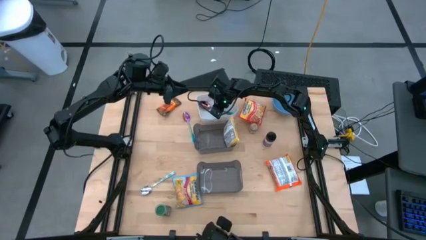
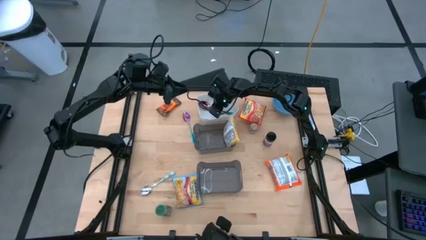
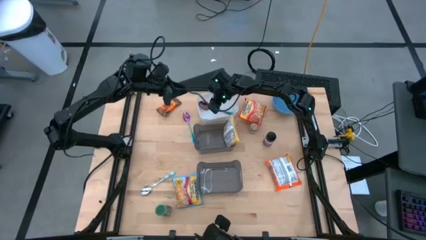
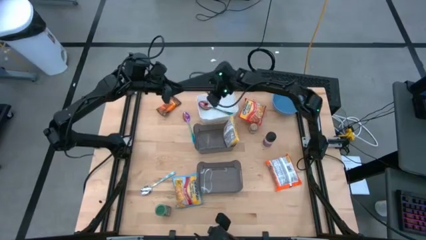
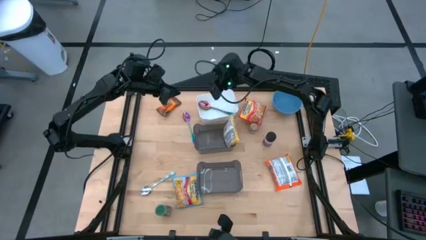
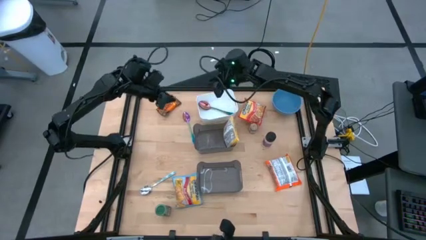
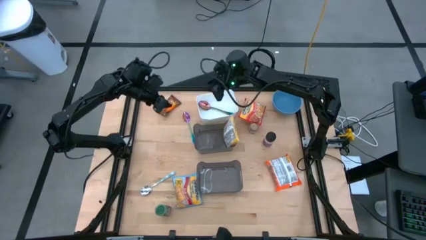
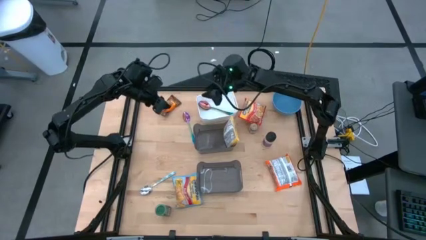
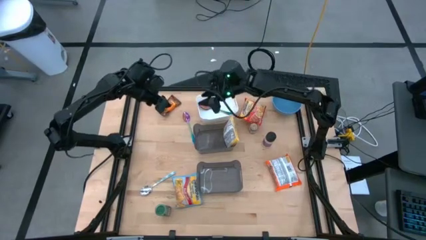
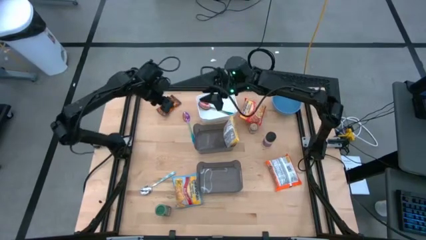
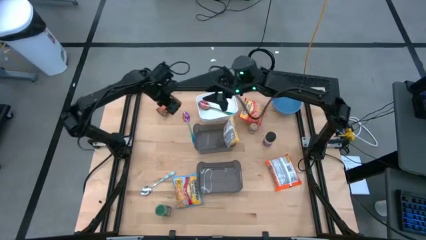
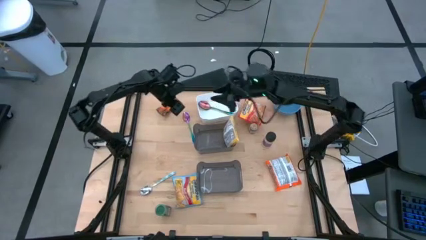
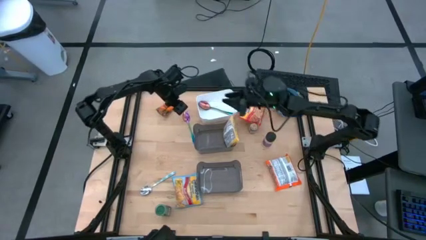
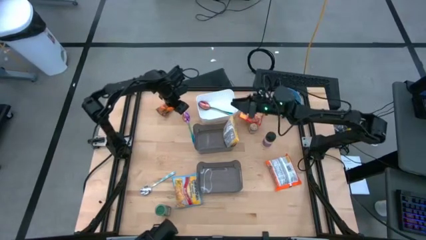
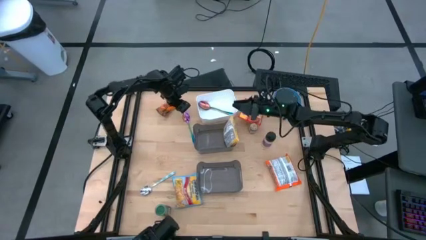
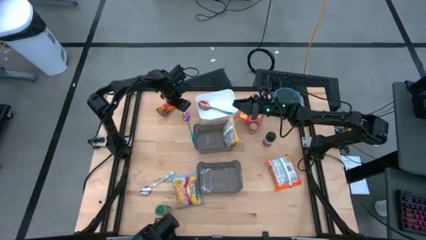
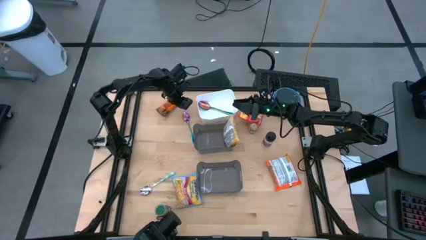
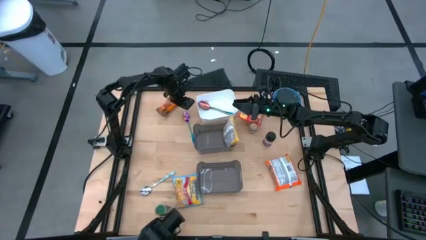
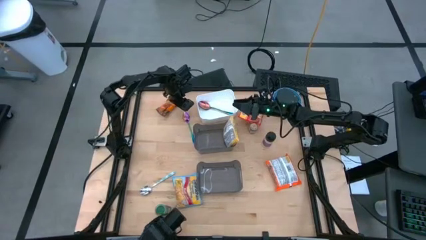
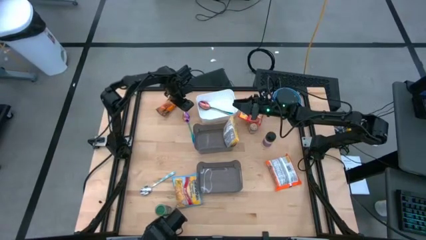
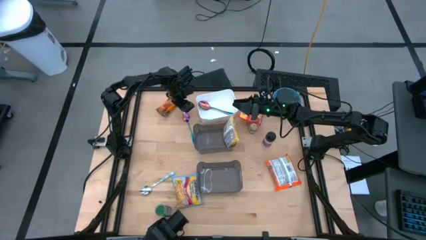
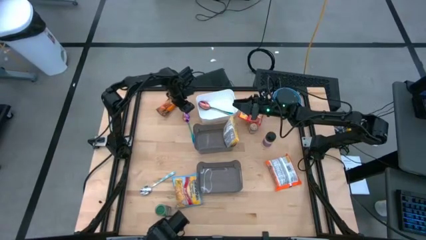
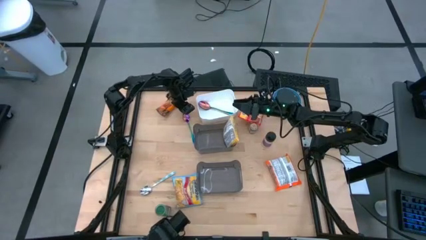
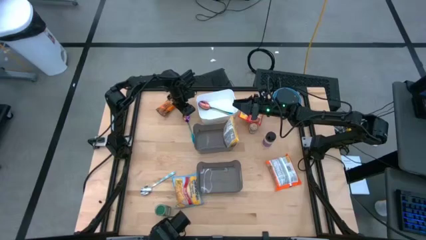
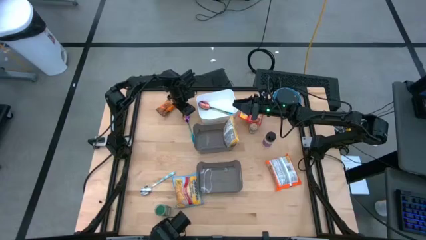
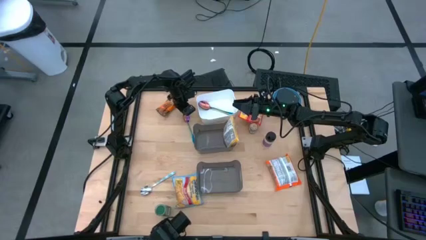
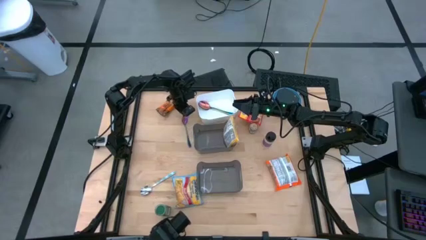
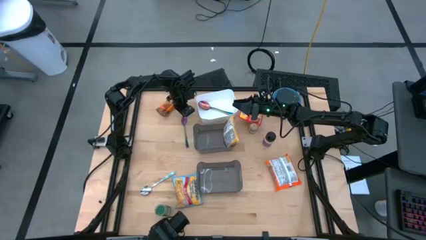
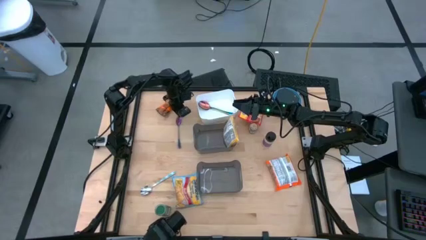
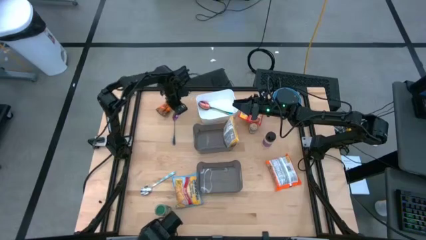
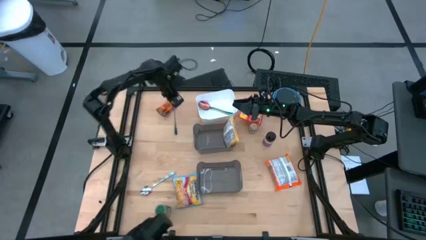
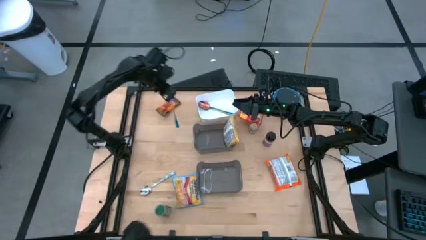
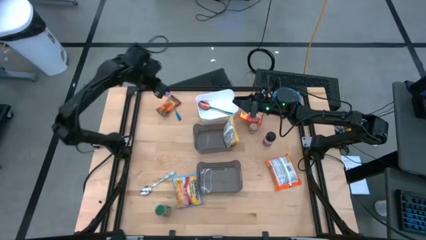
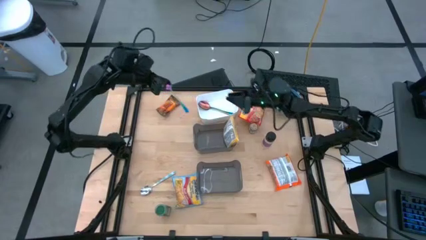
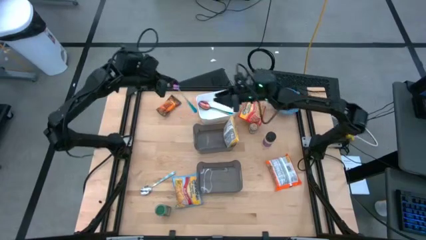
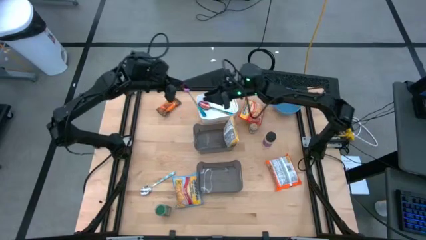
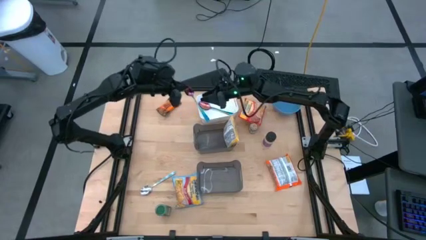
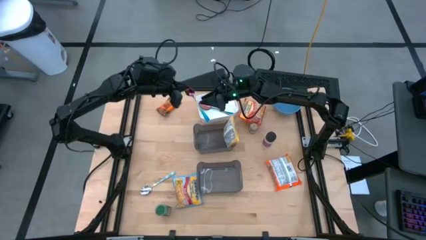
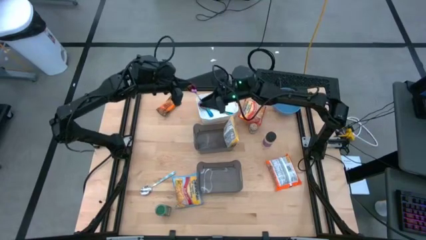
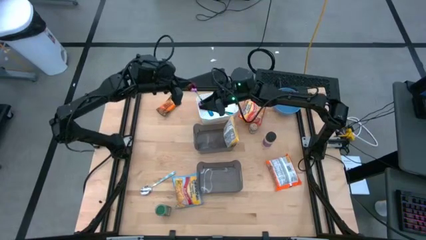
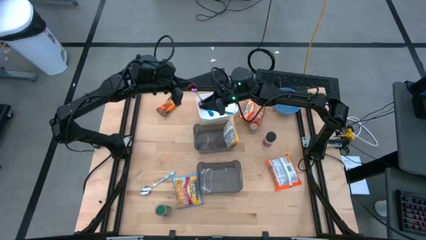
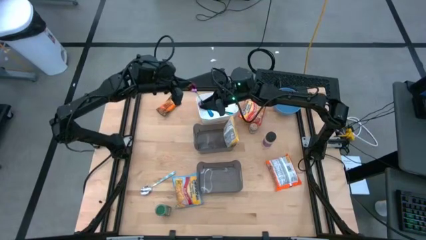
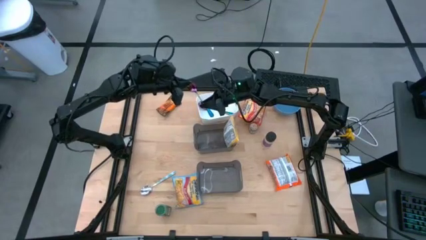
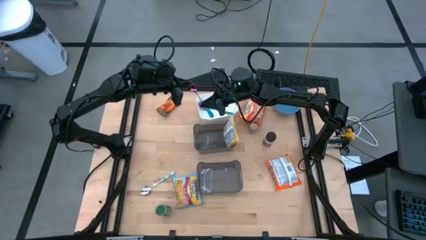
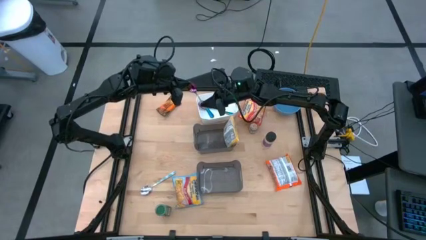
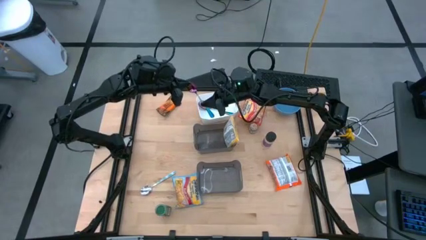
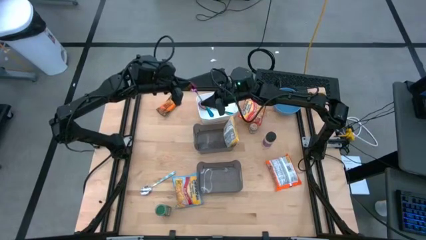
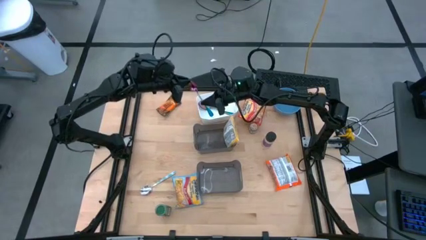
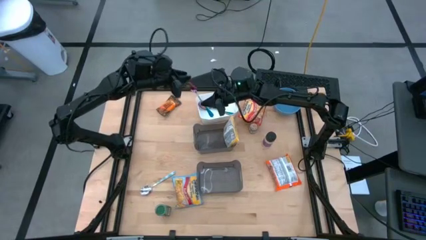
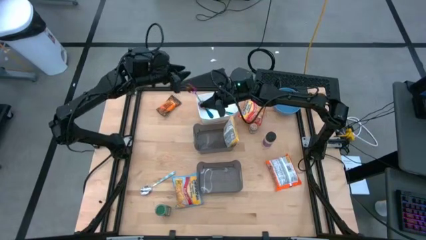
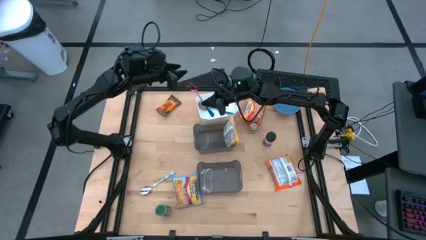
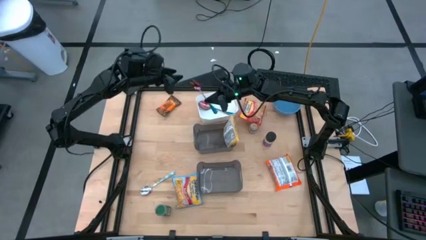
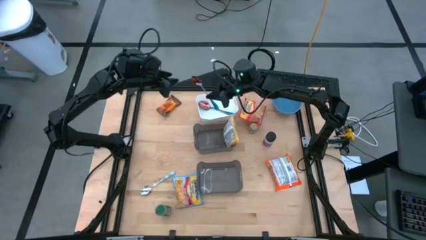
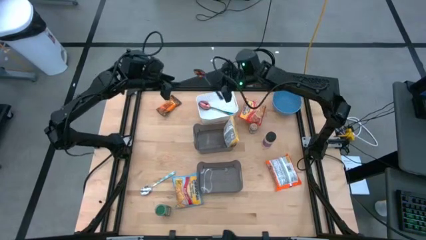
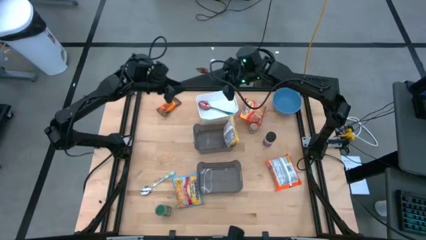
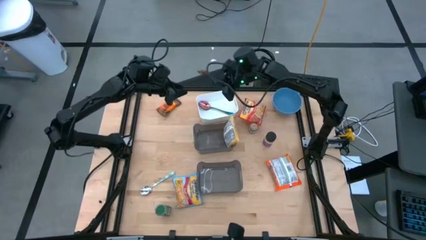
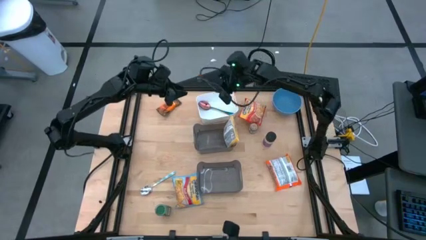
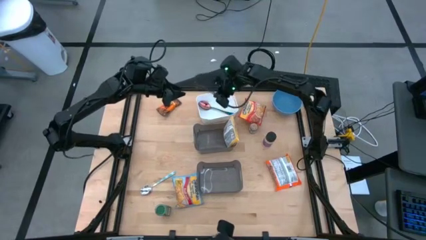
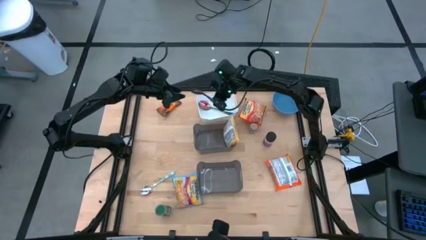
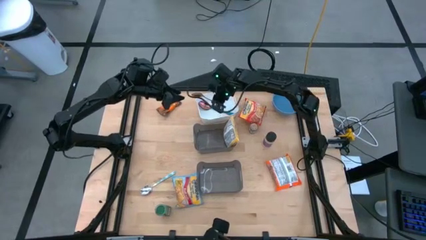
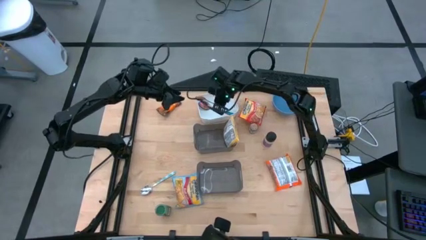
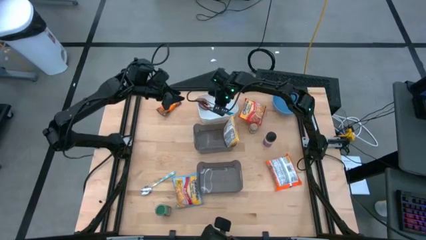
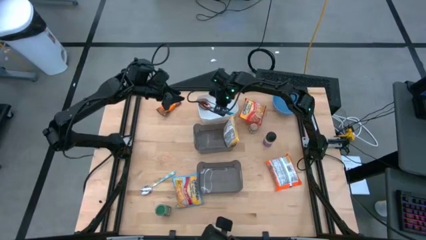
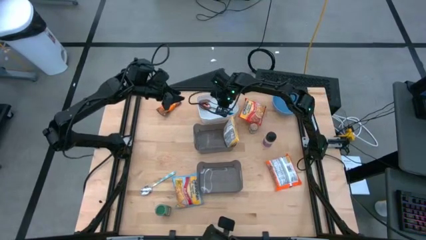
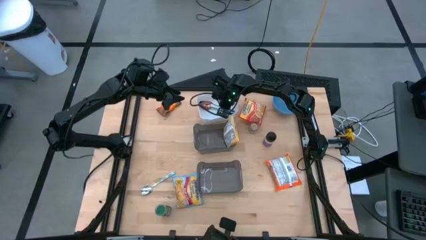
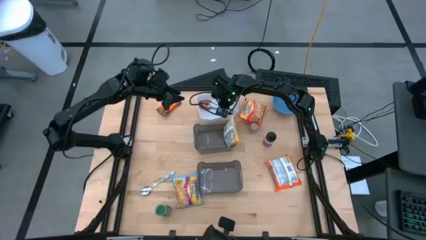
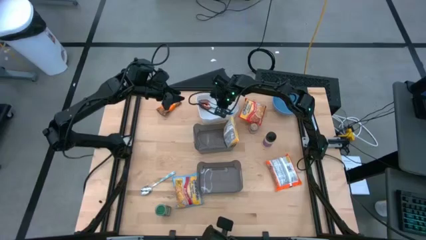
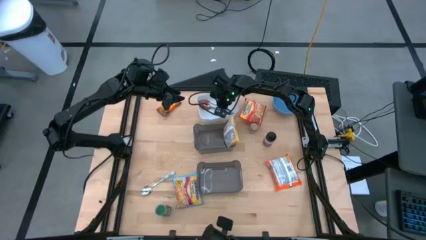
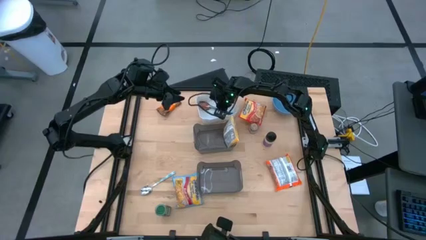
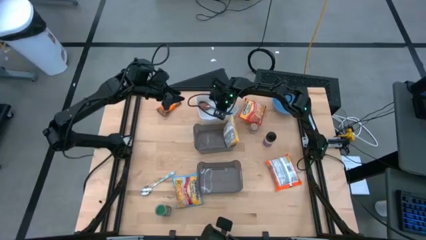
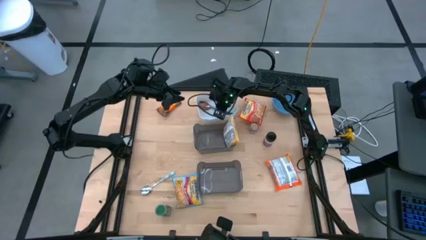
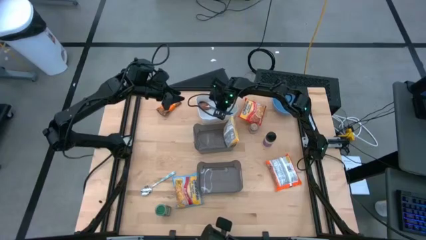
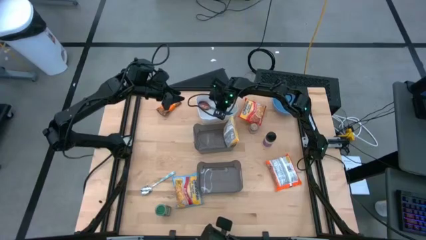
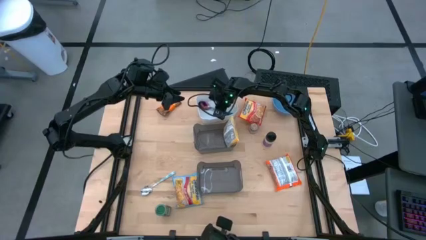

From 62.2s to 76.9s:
Task: Pick & Place Food Item
Put the blue spoon into the white bin
